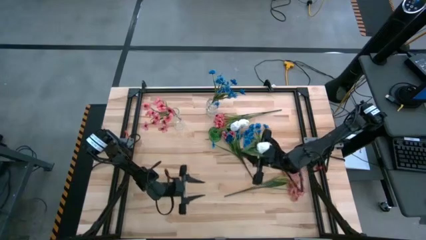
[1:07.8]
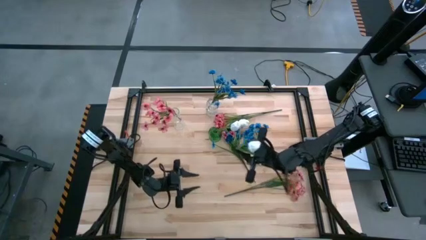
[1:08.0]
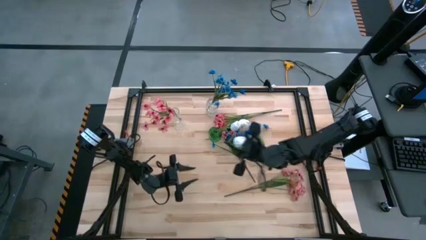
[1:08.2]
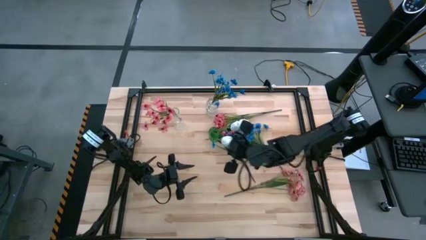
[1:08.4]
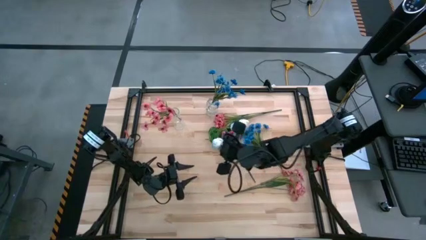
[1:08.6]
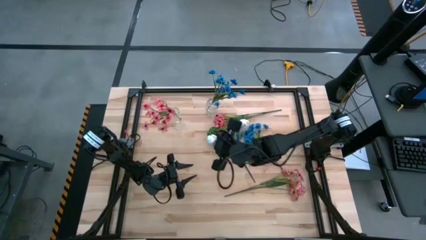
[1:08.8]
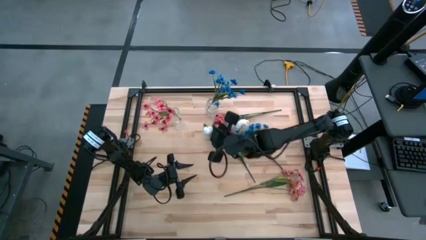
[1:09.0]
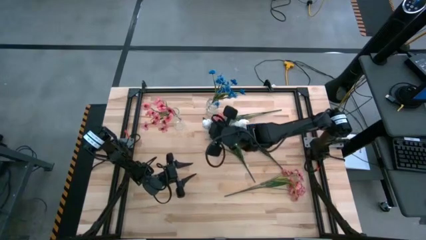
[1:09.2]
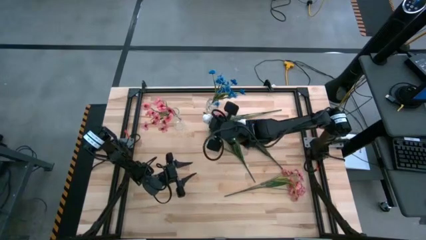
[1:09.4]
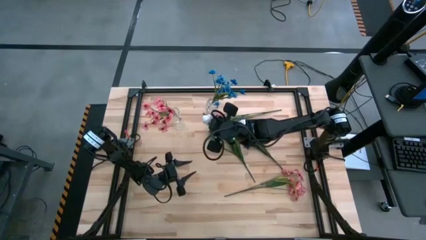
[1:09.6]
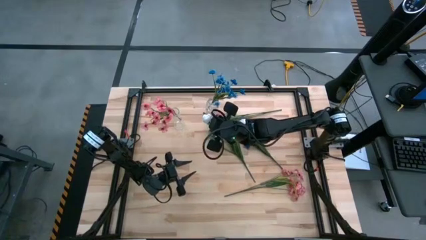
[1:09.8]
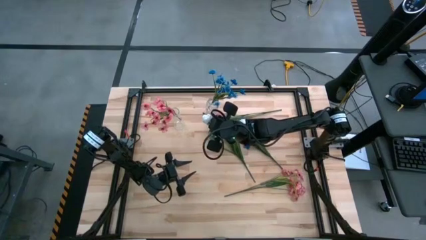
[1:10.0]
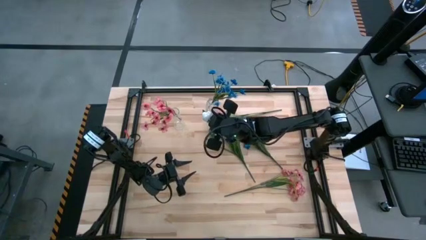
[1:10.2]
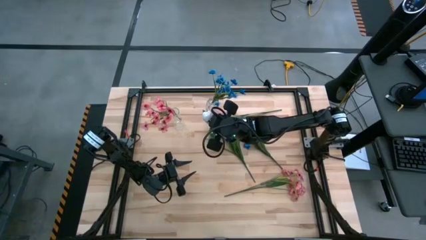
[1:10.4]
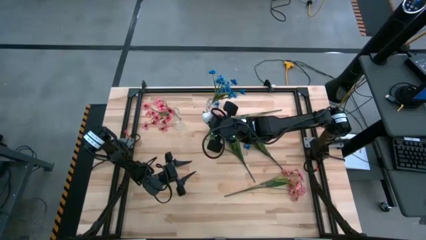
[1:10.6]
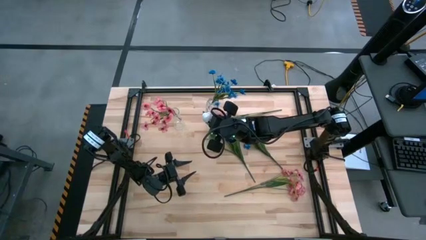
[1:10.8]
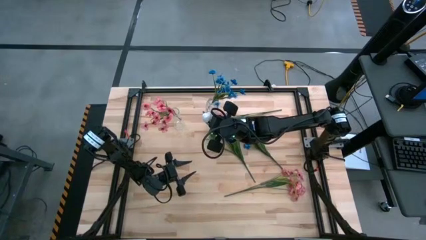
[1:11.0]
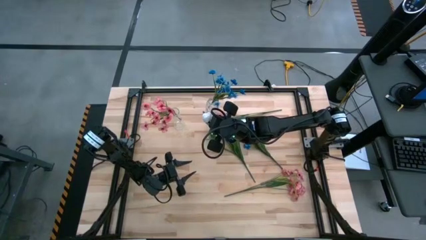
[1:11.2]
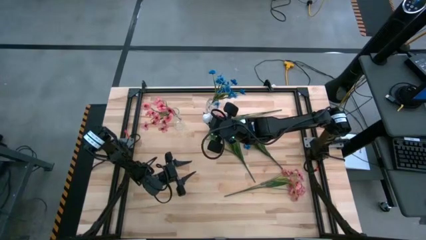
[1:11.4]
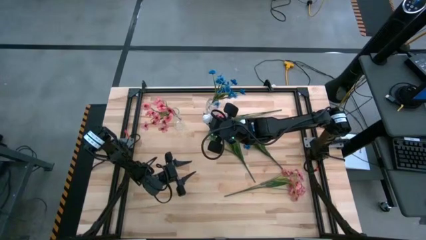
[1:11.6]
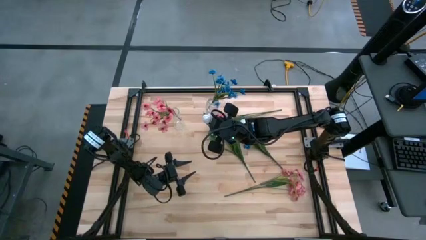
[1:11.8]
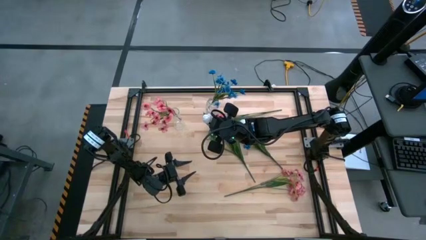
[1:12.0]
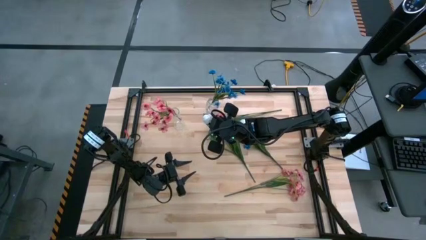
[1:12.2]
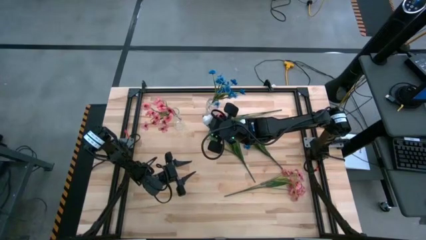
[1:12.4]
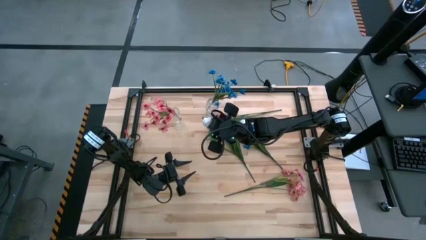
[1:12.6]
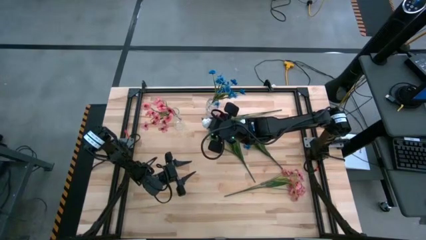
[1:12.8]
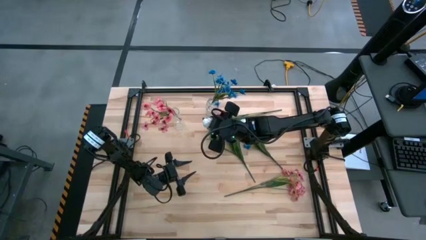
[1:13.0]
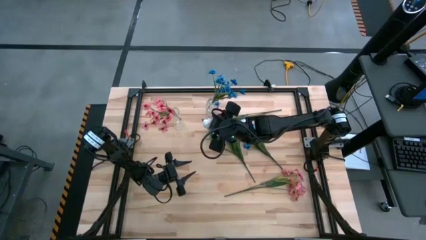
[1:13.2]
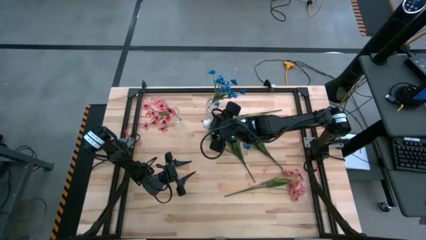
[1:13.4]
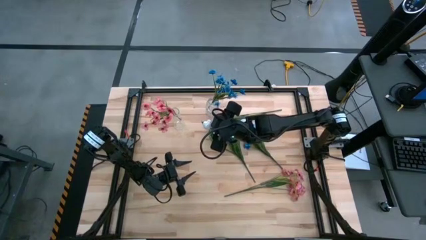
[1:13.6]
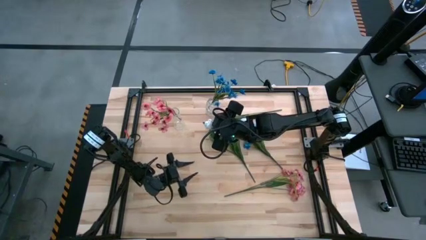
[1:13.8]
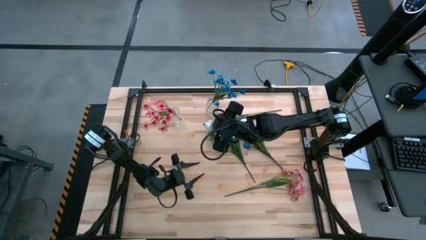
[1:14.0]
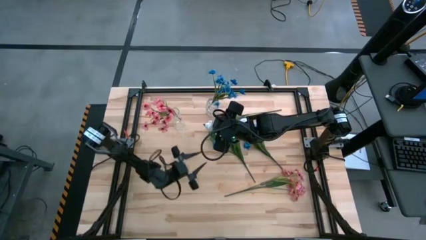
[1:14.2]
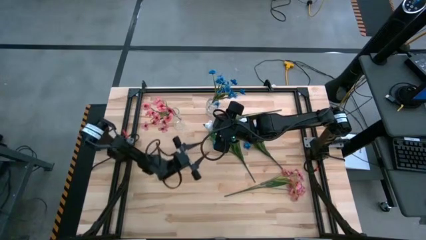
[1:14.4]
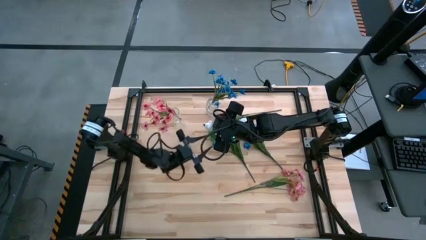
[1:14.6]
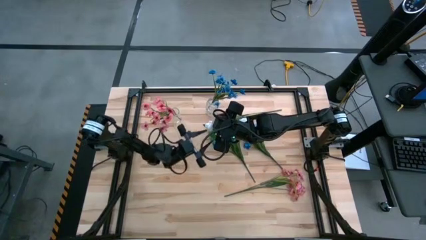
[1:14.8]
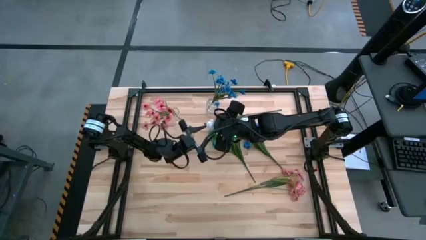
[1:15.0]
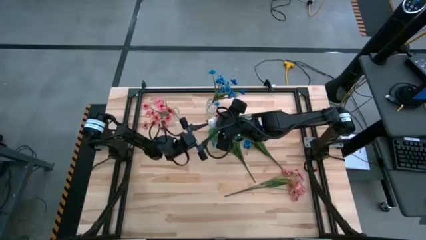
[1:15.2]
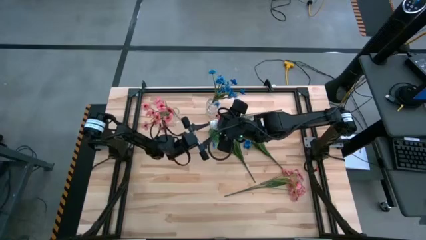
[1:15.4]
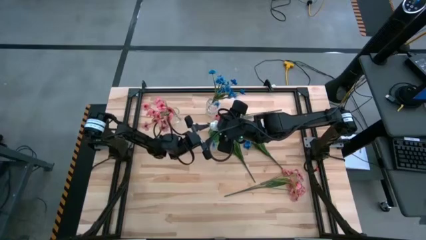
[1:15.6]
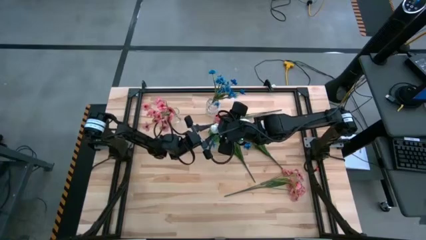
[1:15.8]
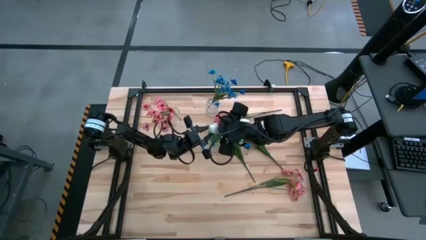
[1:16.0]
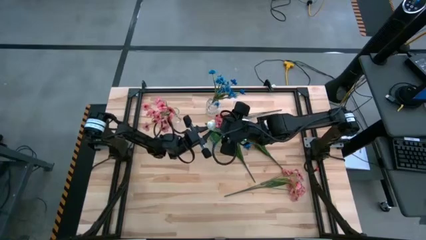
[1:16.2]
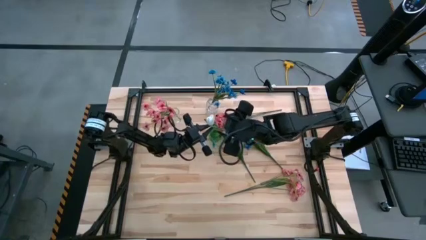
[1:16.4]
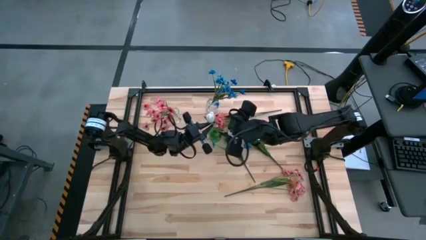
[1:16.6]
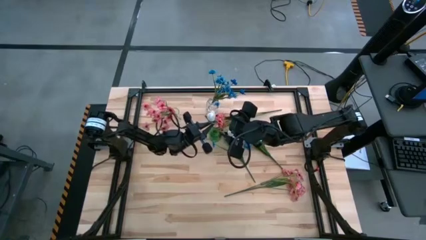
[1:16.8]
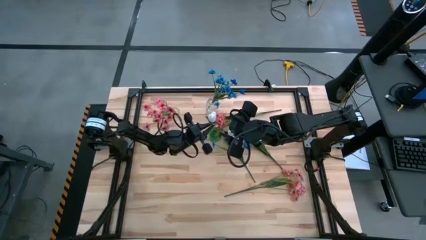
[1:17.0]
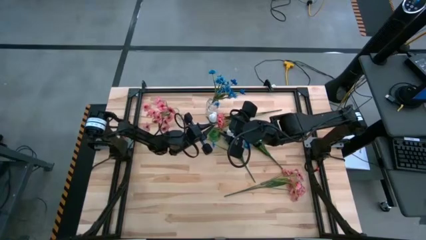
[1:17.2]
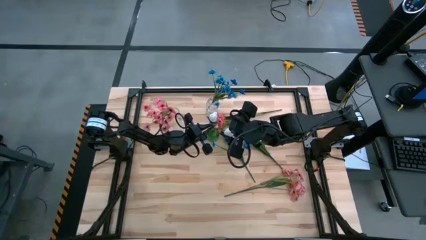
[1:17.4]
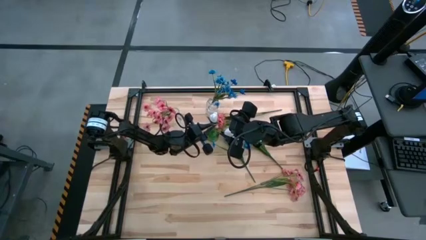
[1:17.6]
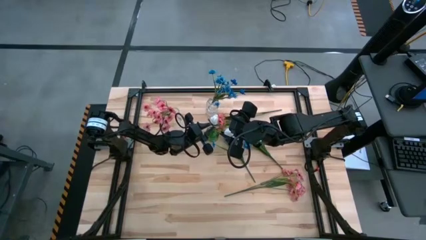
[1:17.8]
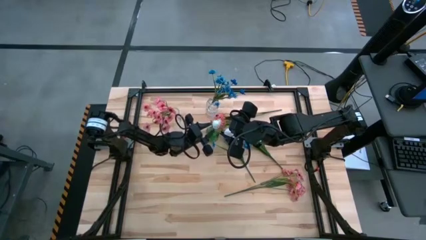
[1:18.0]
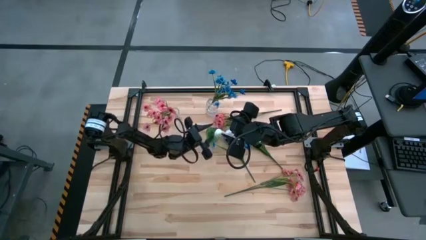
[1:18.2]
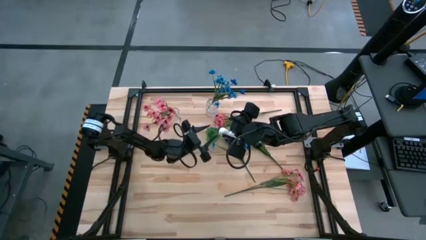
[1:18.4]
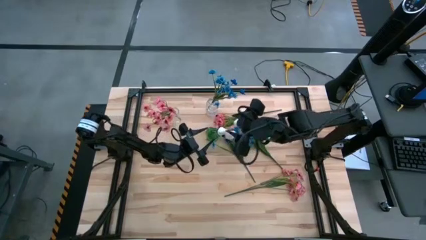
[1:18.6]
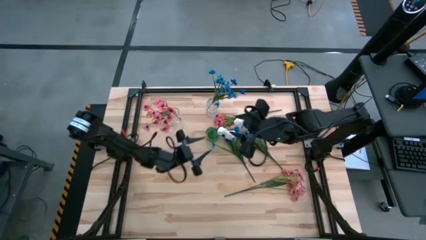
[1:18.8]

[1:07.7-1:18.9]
Task: Sort flowers into vase by color
Put the white tulip flower into the green vase

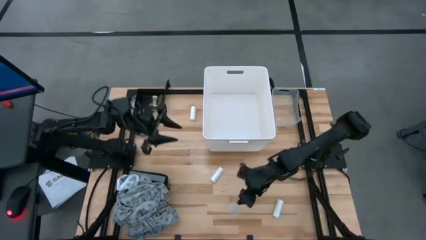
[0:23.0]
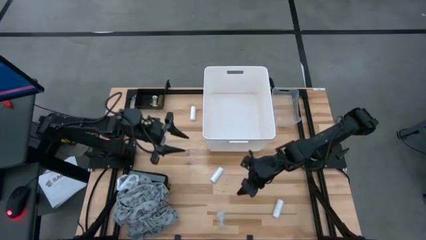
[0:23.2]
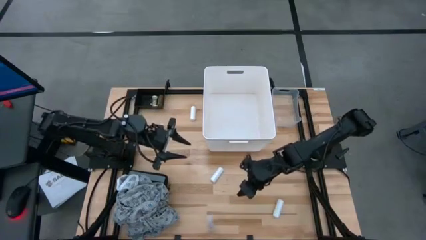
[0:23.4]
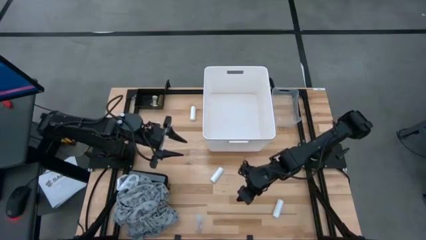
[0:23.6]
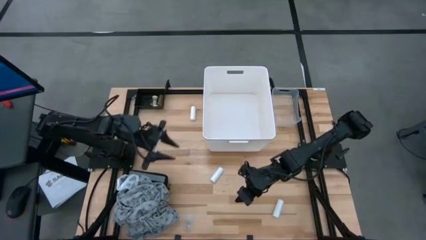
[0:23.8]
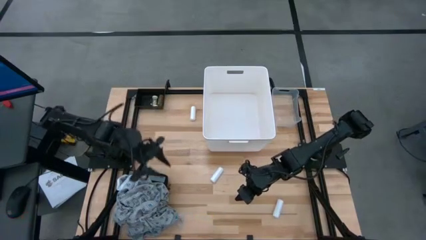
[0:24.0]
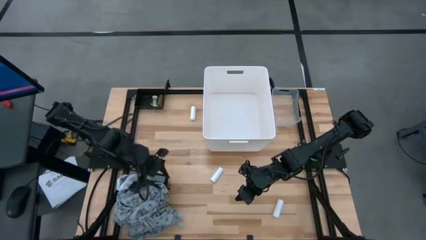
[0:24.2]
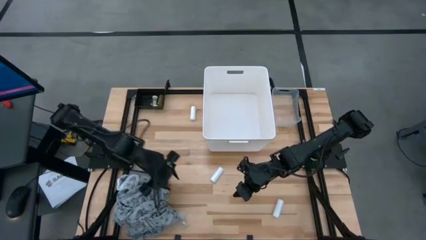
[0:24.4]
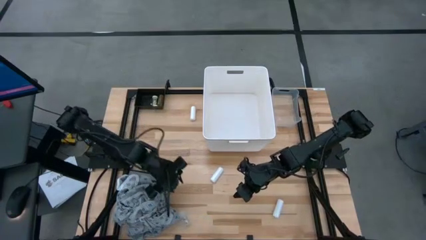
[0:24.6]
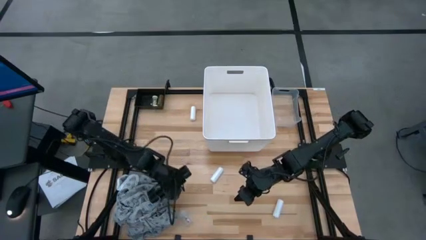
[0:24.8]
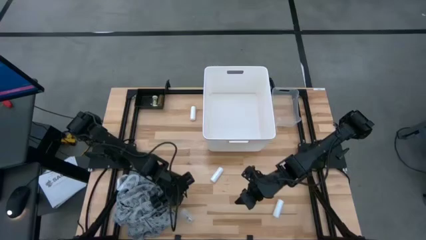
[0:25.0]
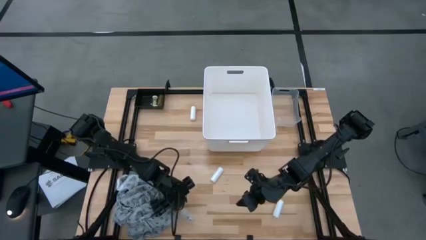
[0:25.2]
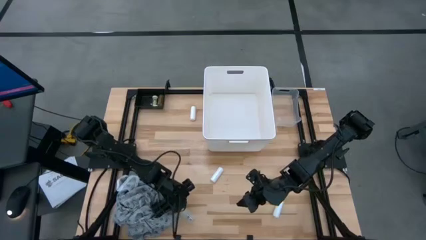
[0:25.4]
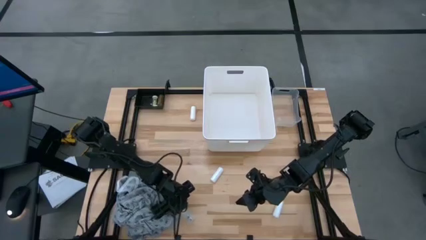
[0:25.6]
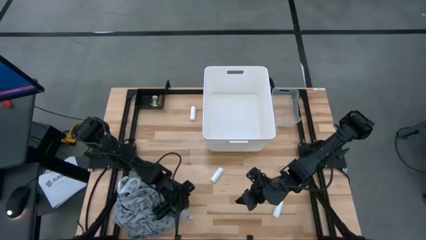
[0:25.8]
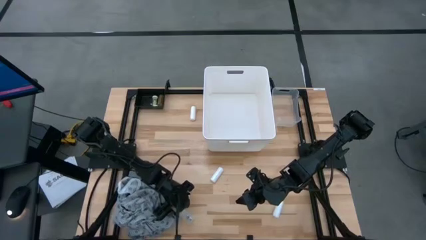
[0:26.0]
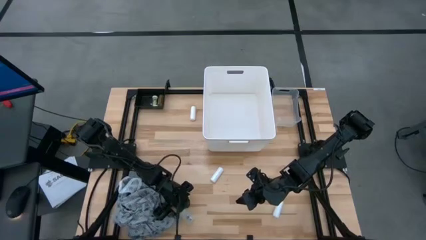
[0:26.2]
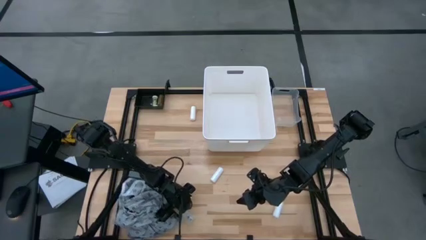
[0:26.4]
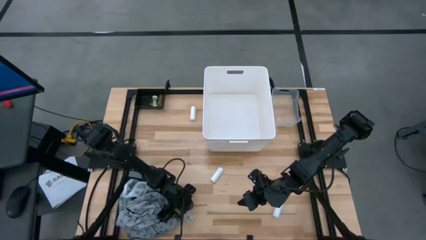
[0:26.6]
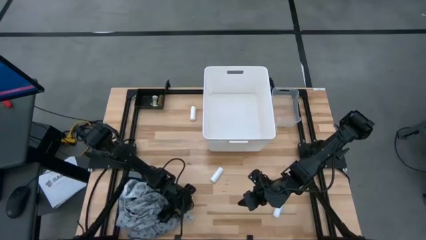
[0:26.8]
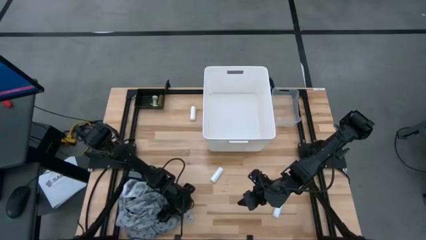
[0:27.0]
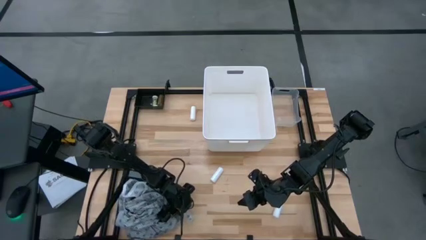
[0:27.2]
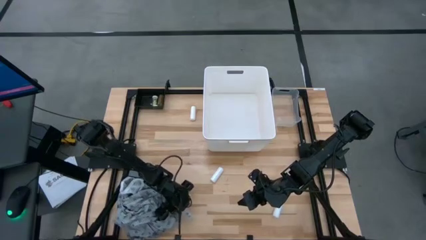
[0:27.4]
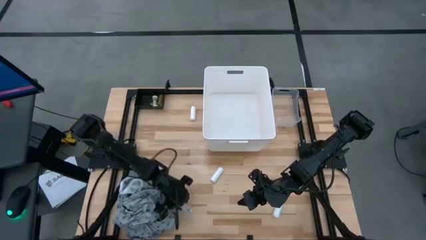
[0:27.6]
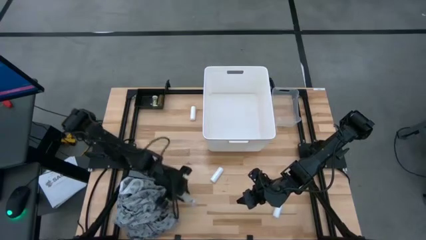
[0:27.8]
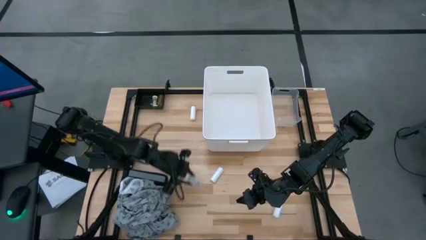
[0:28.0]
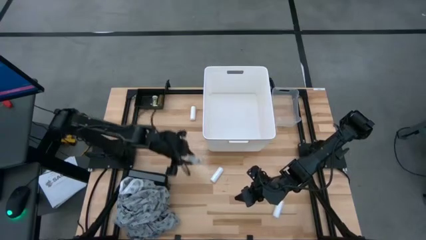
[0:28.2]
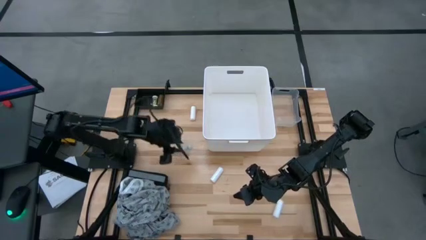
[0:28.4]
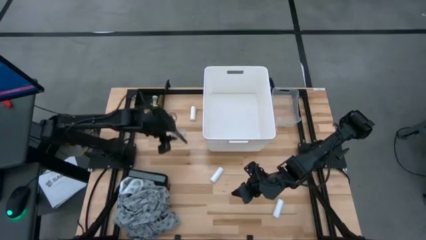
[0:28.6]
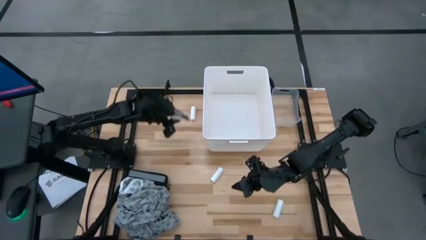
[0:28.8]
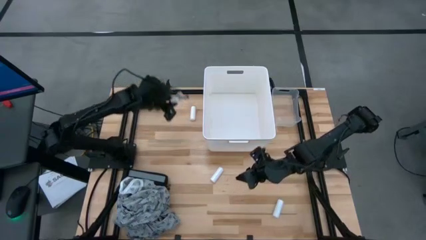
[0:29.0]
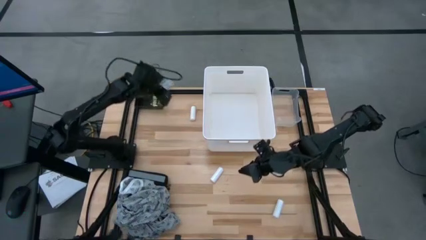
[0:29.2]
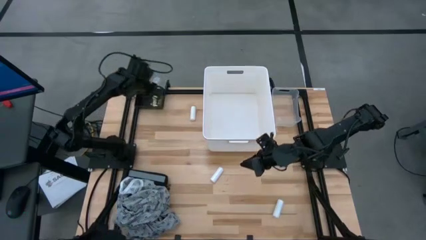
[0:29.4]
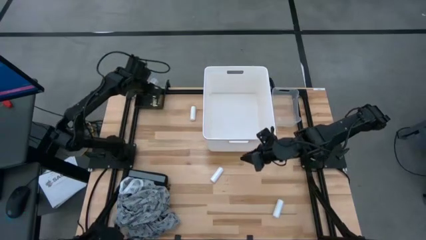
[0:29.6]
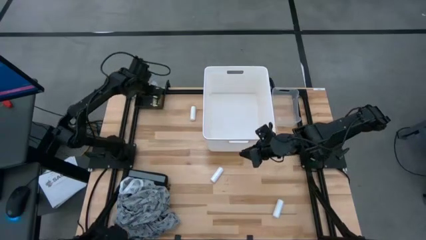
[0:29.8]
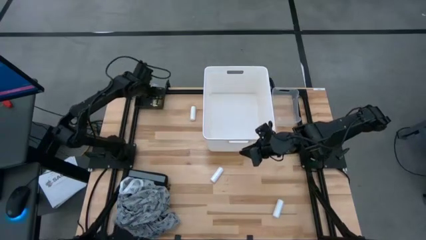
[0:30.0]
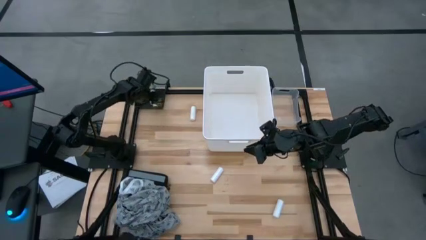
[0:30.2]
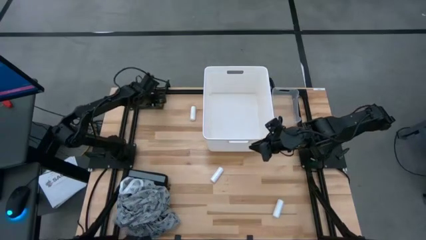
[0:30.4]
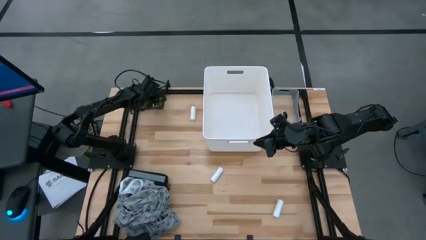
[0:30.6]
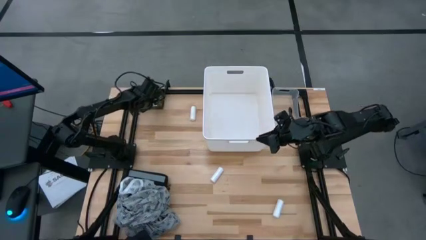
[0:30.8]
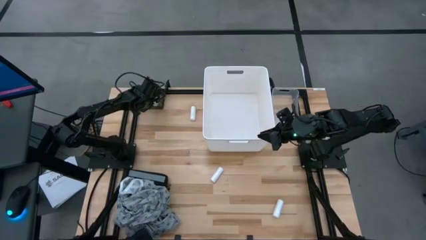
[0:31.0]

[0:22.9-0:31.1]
Task: Pick & place medical supplies in basket/bin
Put the transparent bottle in the black bin
